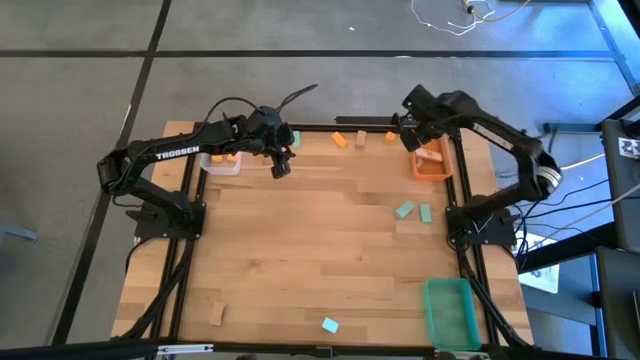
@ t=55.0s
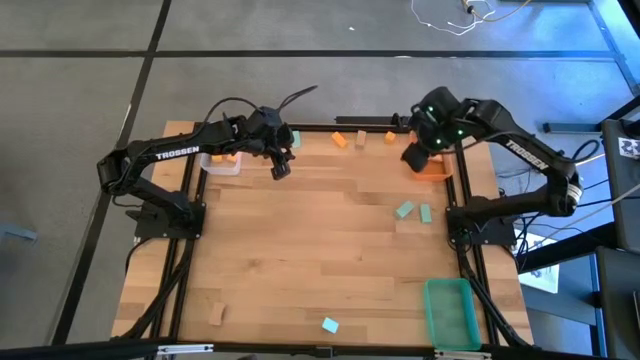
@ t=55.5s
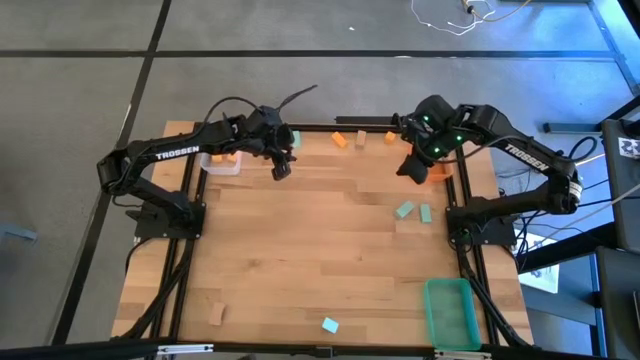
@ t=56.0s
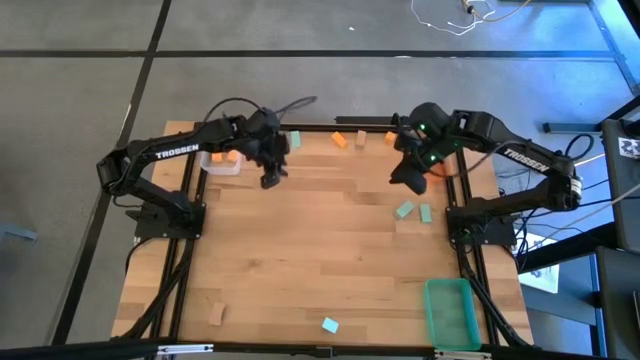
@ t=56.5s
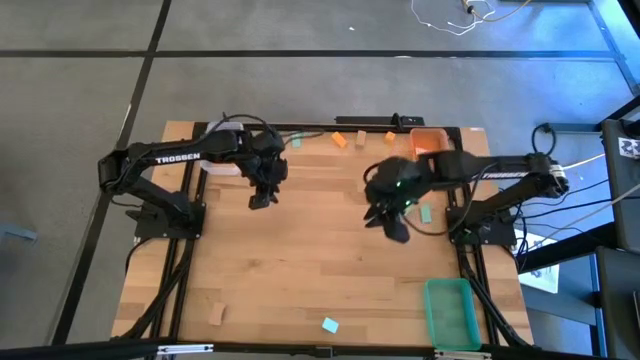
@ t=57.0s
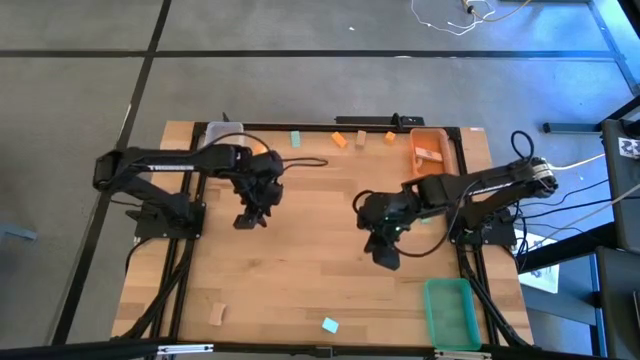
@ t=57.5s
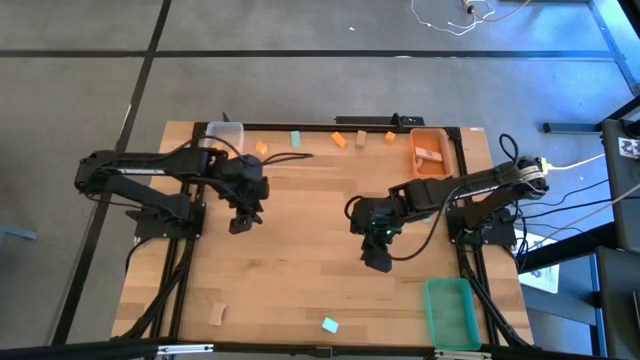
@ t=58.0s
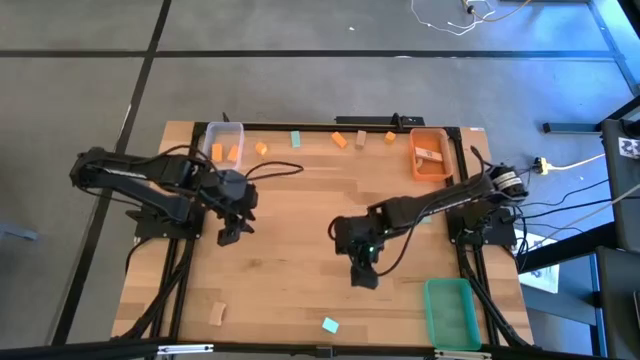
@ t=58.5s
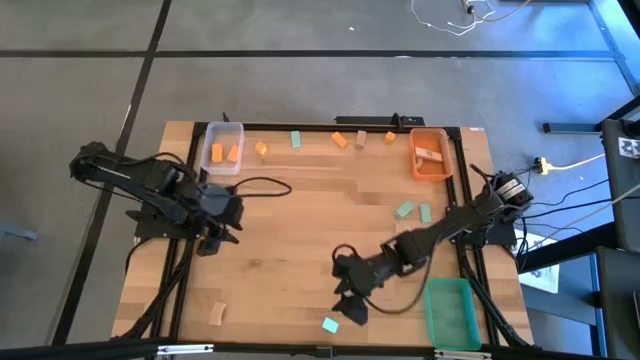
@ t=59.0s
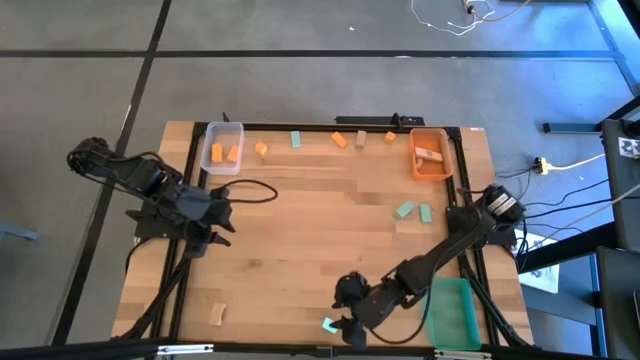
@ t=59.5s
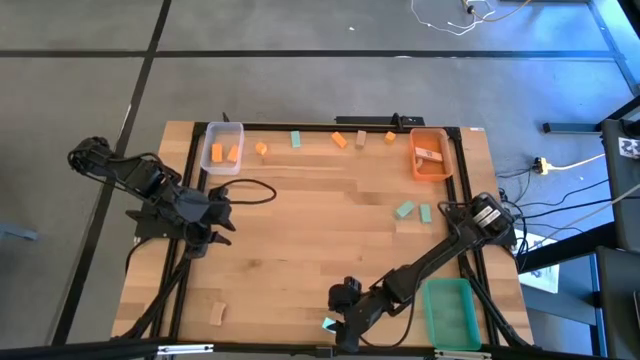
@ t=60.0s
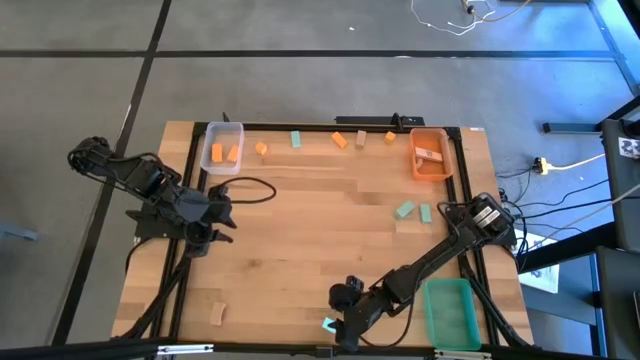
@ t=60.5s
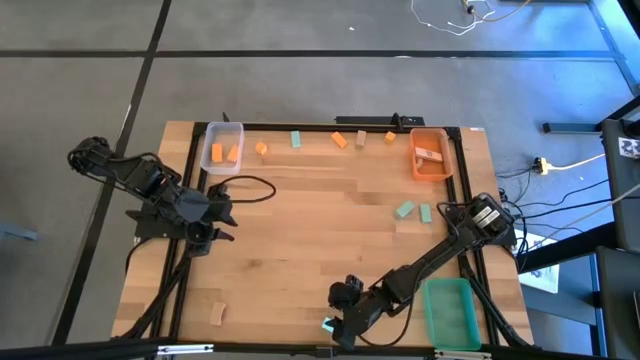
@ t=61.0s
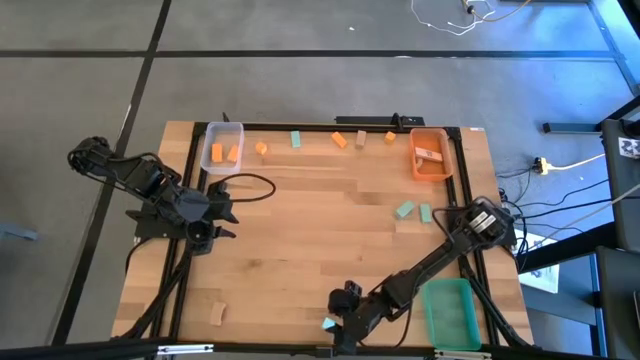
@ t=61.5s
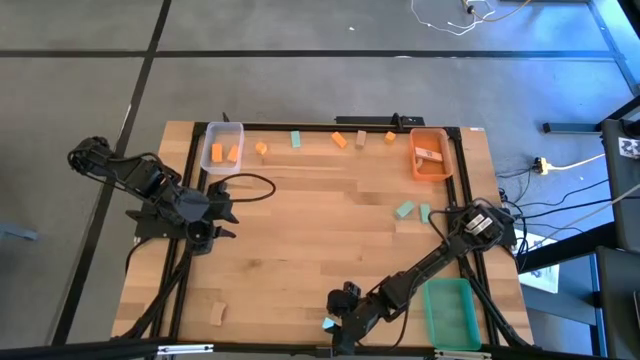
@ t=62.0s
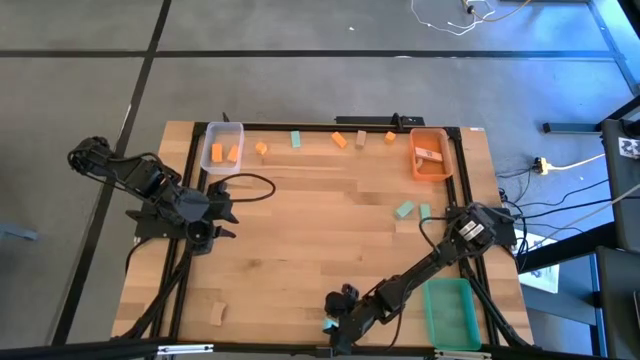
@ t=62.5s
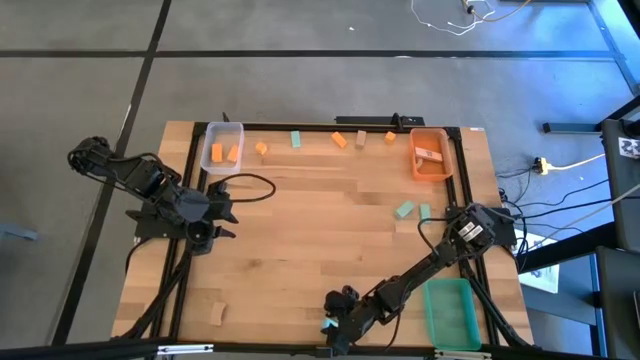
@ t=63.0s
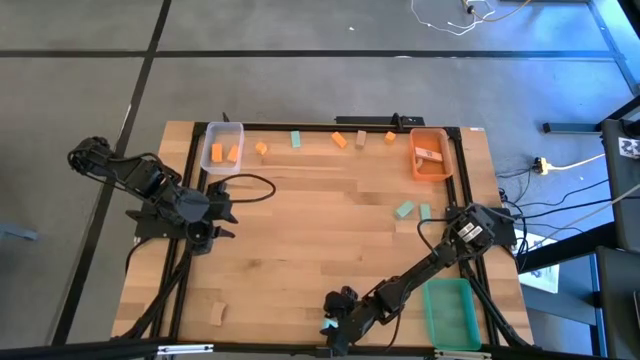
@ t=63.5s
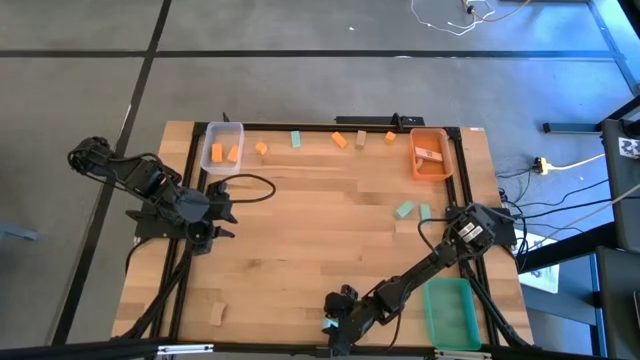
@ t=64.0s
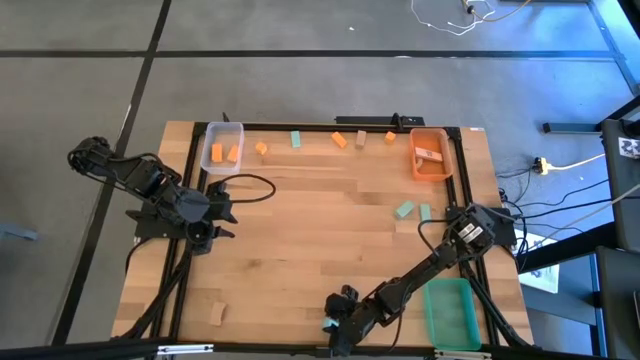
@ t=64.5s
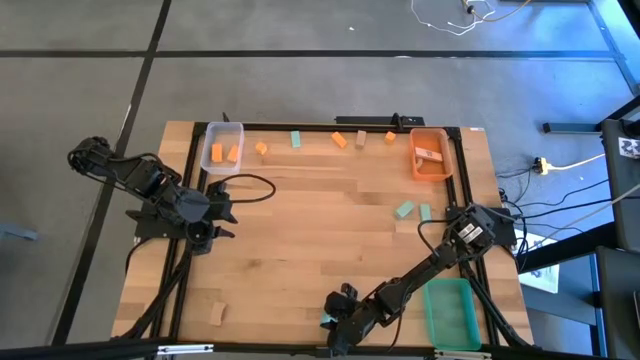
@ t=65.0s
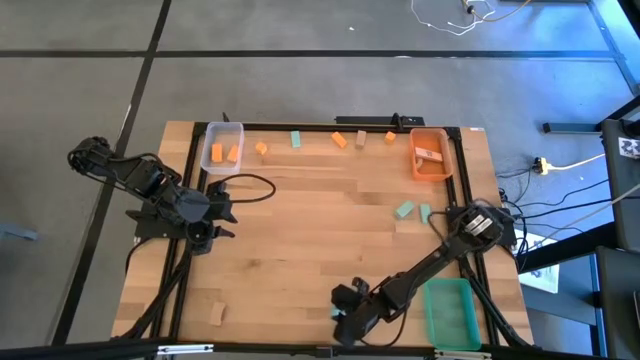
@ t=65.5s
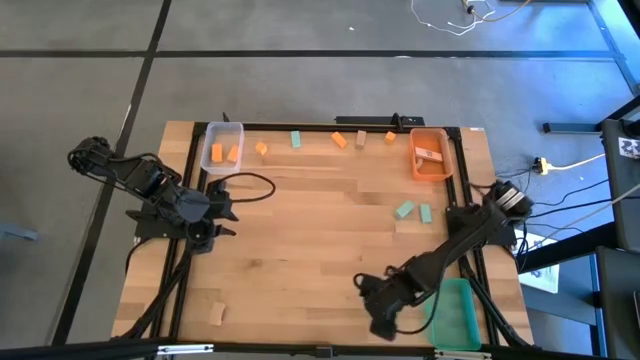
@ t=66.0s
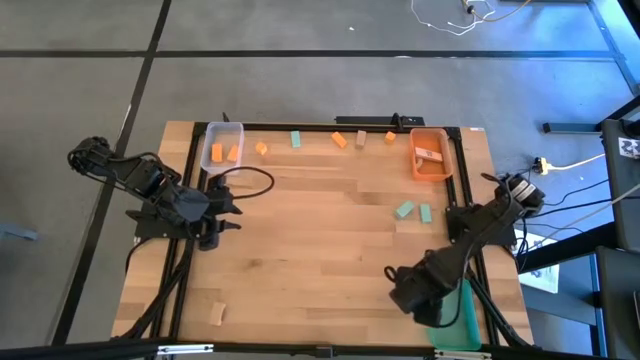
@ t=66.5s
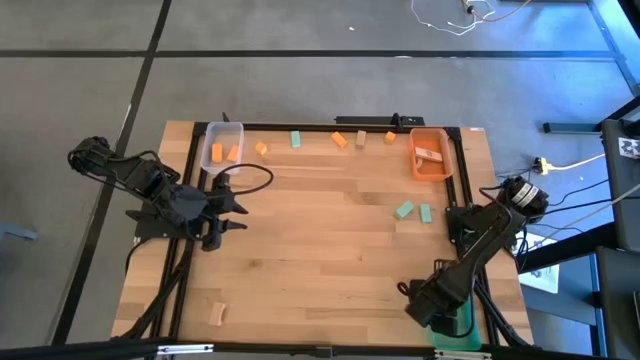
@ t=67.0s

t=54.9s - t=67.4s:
Task: Sort & place blocks by color
Put the blue block into the green bin

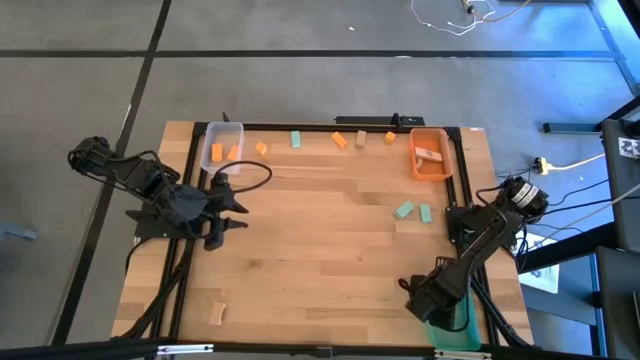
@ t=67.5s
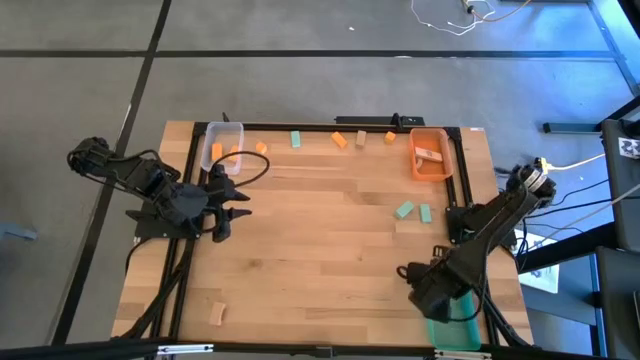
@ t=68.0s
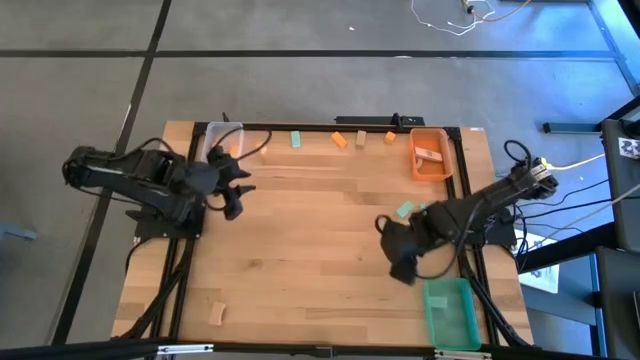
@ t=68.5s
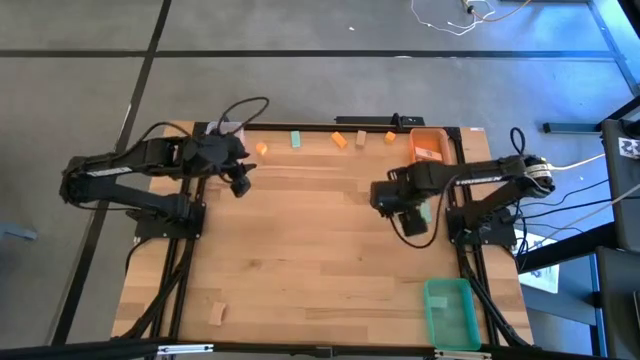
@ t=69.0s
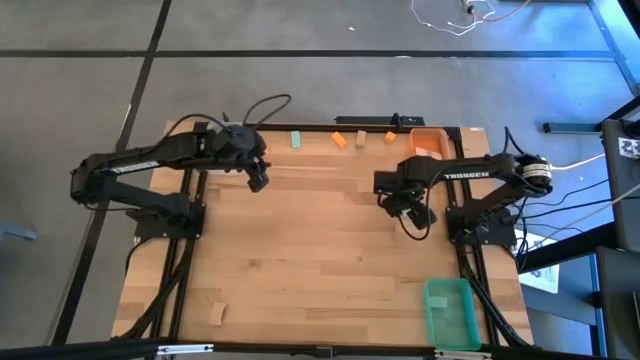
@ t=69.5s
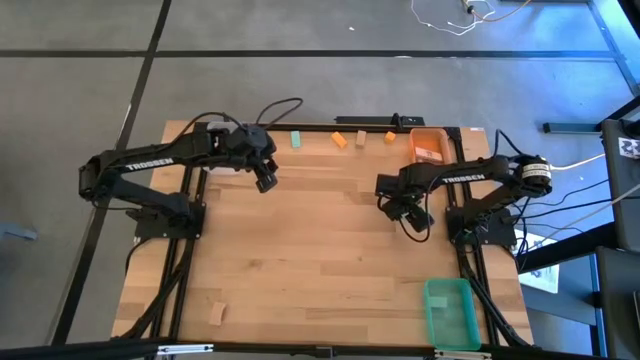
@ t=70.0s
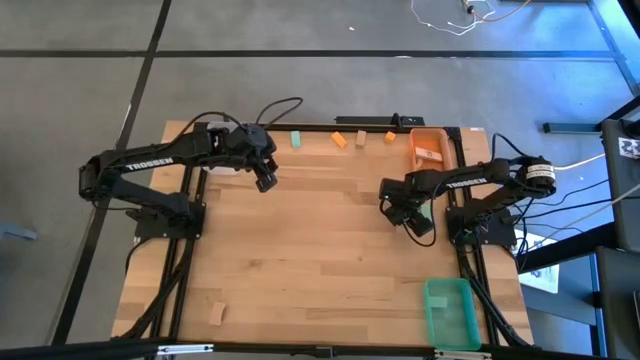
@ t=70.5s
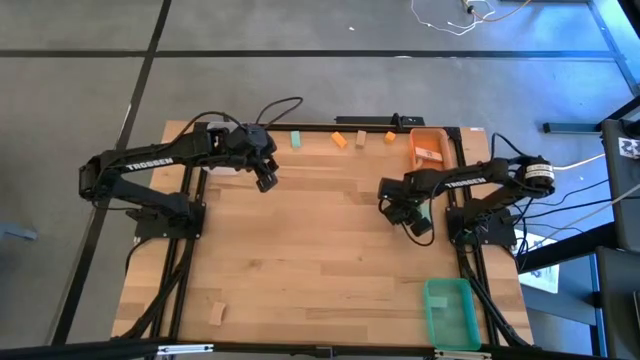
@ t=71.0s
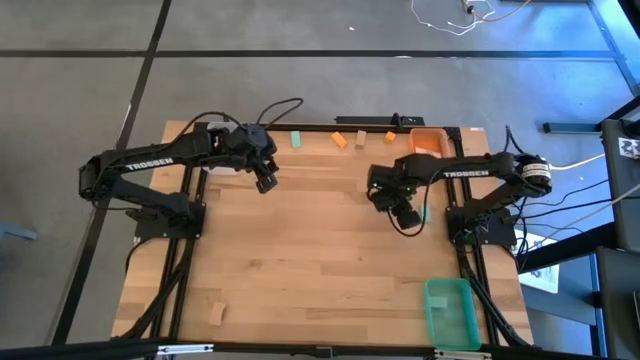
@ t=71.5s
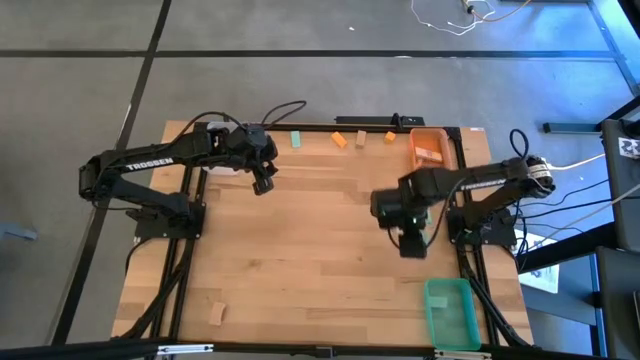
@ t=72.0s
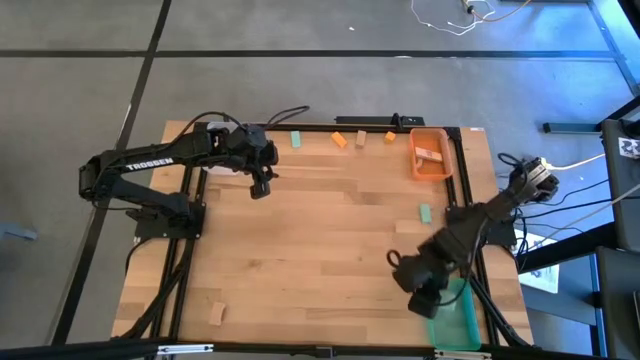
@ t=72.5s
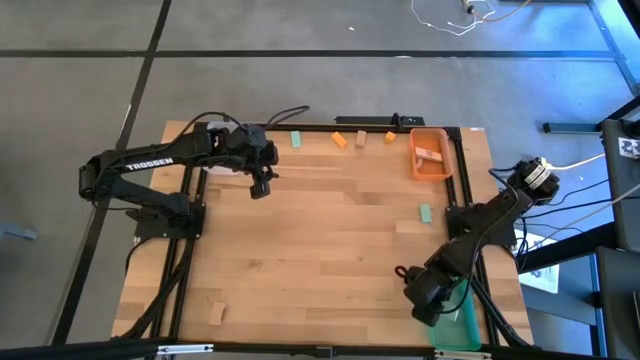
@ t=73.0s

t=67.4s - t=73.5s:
Put the blue block into the green bin

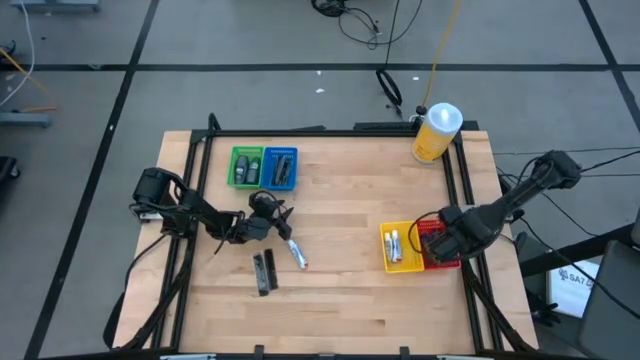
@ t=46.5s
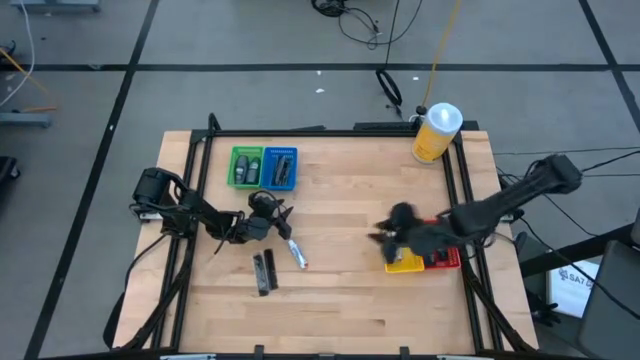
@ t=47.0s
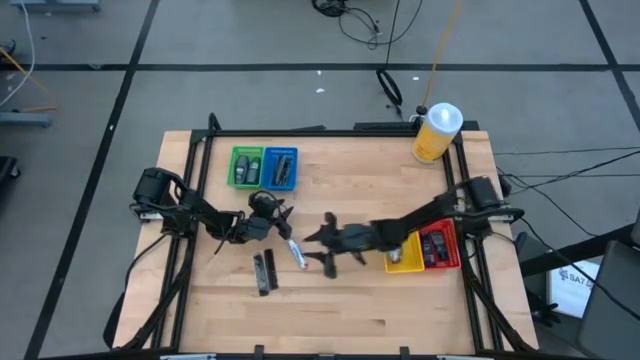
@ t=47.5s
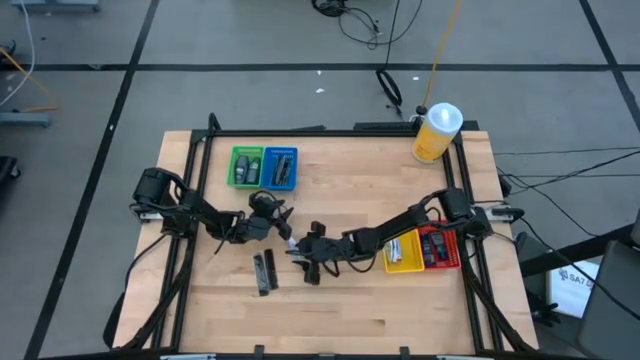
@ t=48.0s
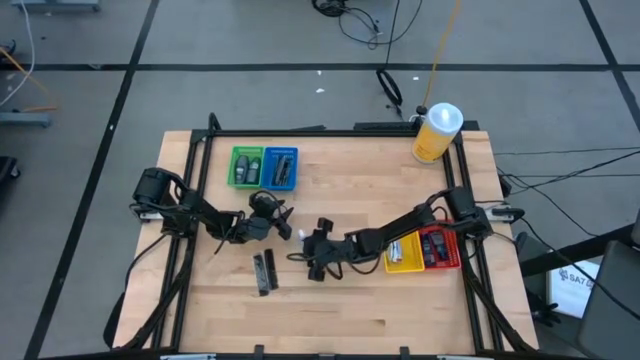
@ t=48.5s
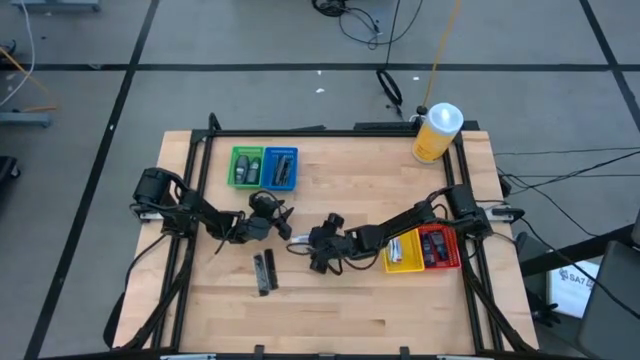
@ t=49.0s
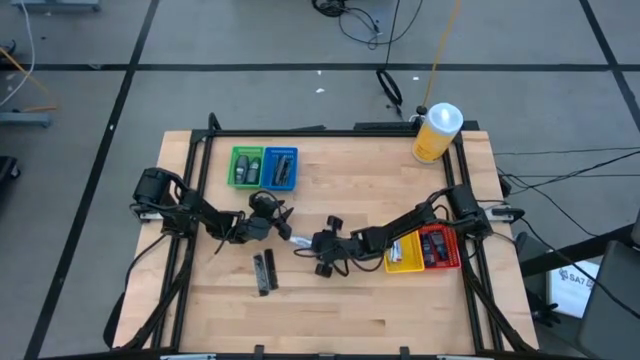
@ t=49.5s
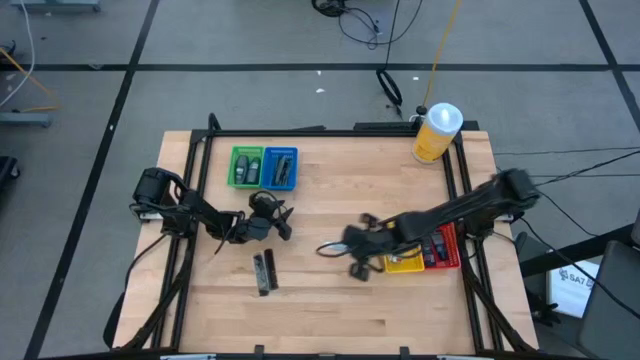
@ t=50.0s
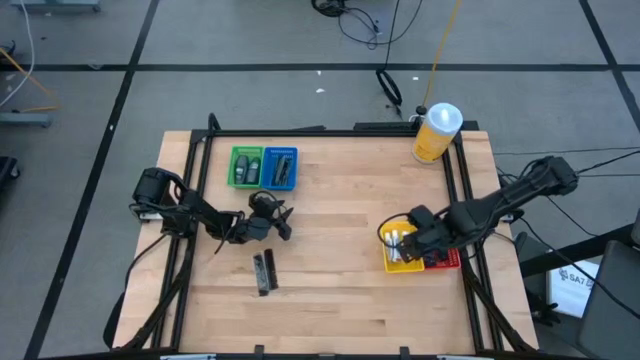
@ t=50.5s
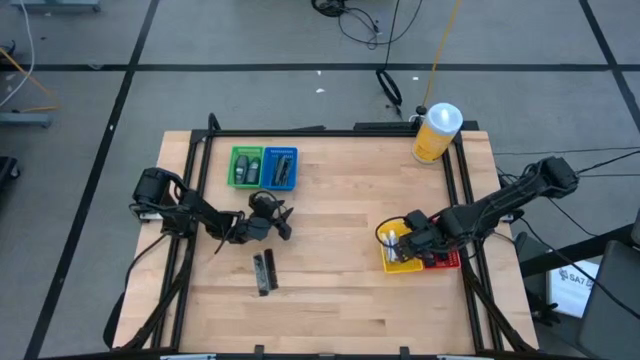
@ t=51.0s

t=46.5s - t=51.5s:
Task: Pick & Place Travel size toiletries
Put the white toothpaste into the yellow bin
